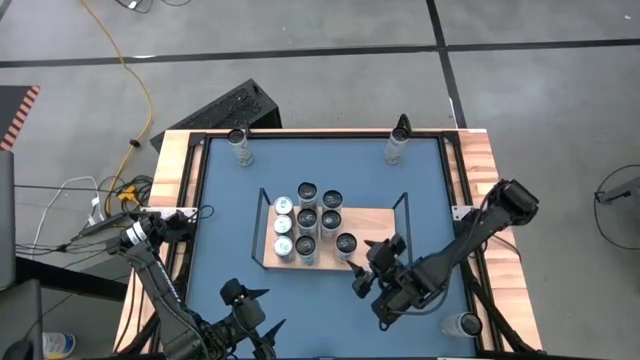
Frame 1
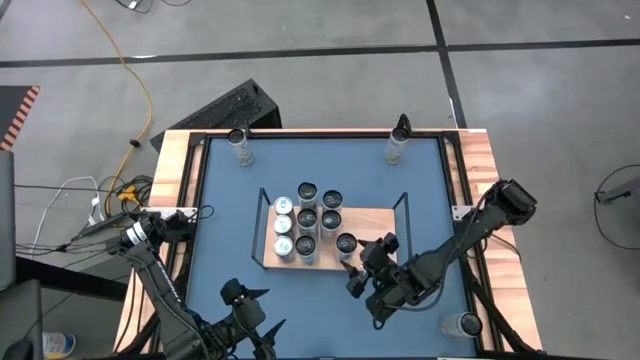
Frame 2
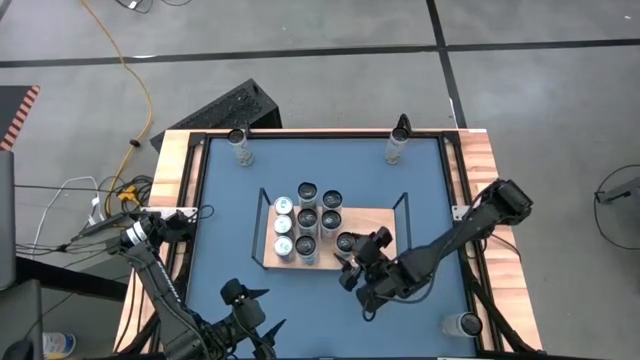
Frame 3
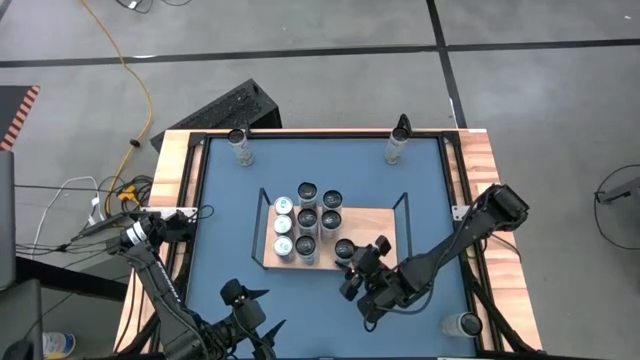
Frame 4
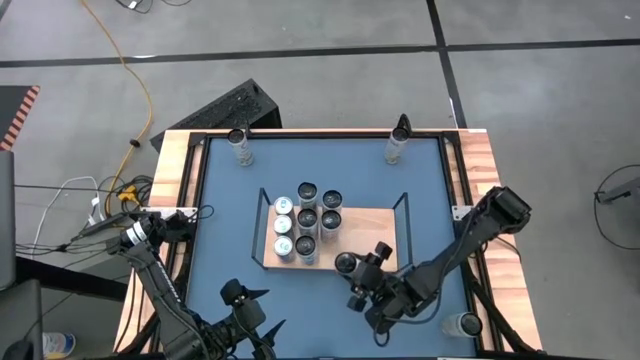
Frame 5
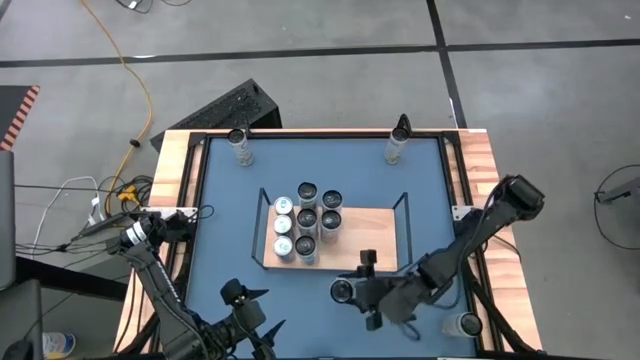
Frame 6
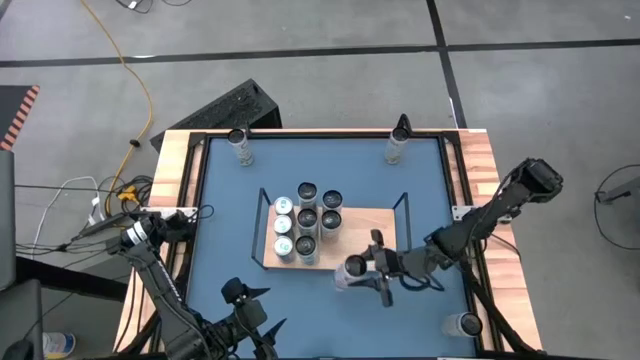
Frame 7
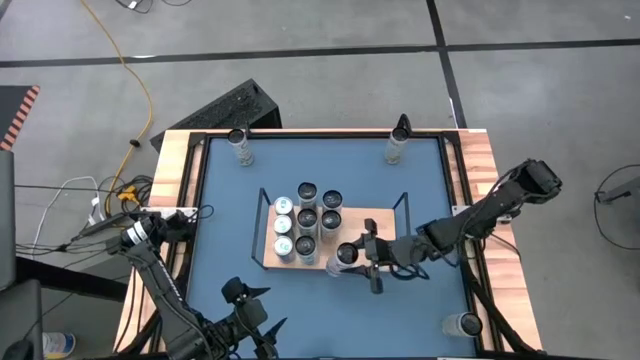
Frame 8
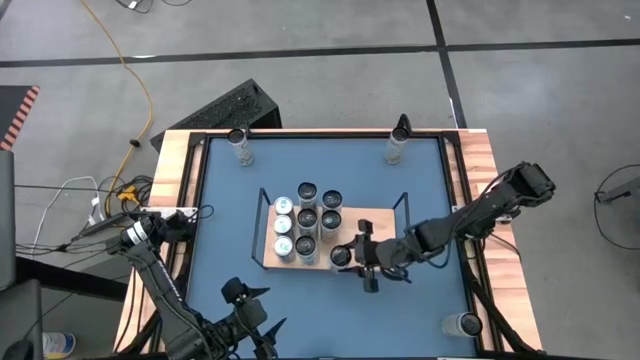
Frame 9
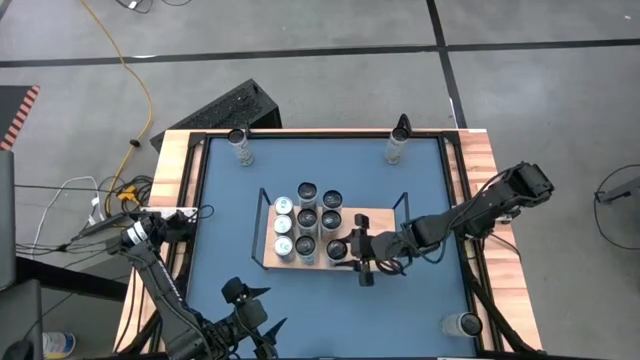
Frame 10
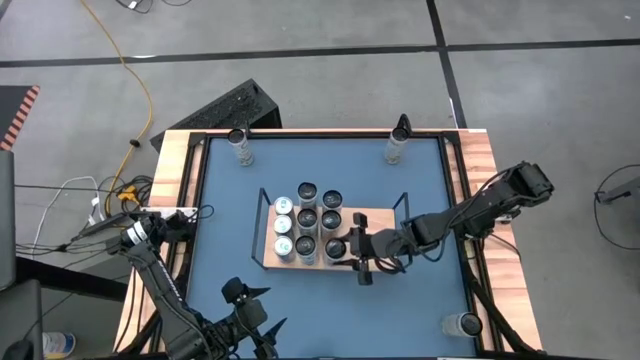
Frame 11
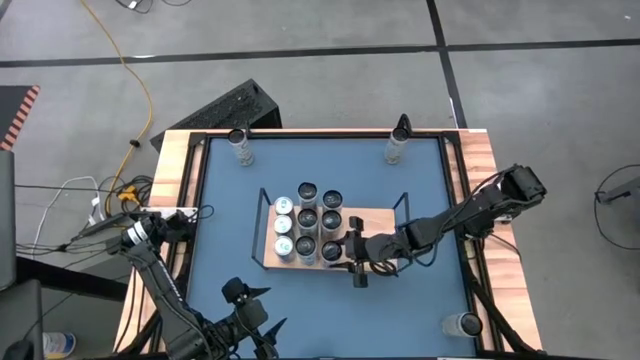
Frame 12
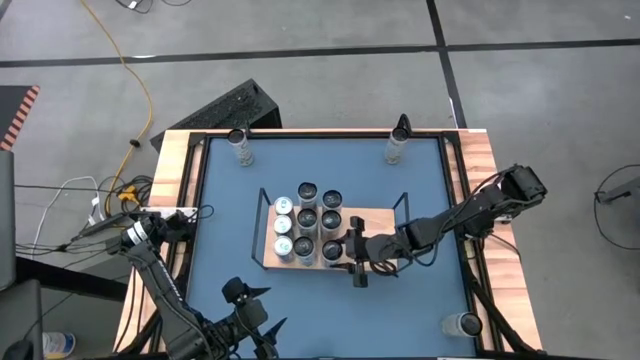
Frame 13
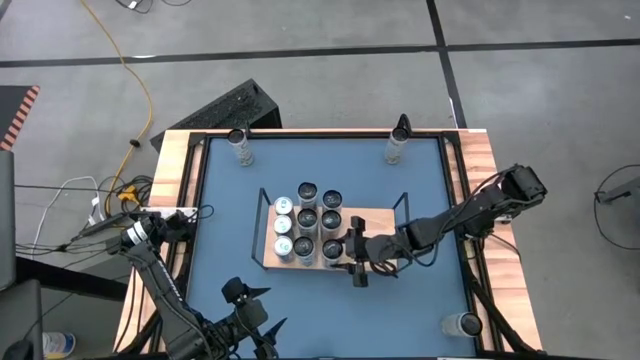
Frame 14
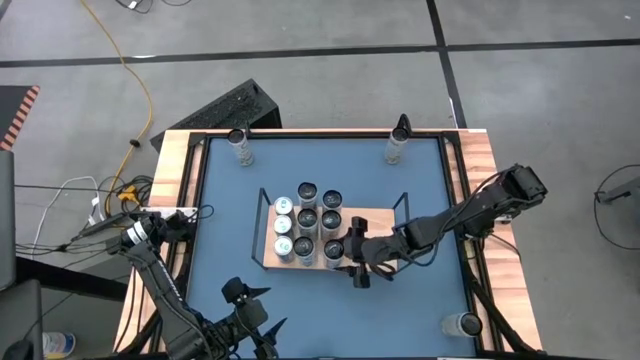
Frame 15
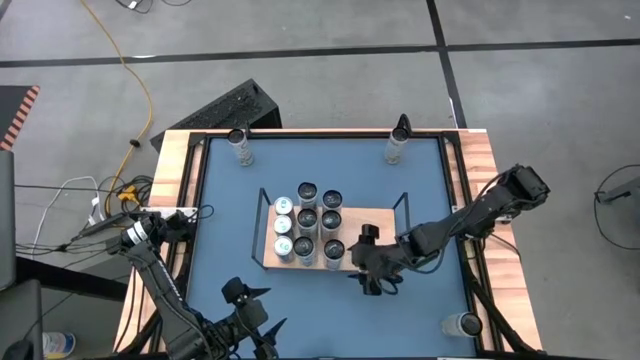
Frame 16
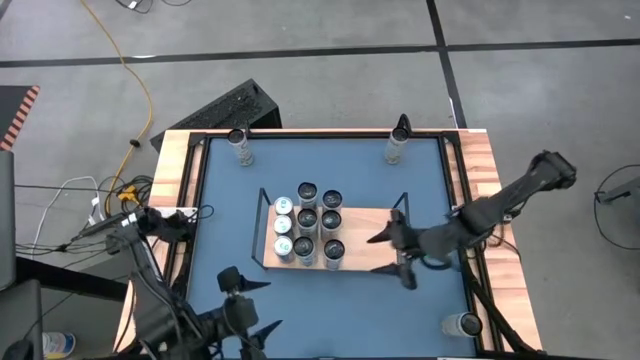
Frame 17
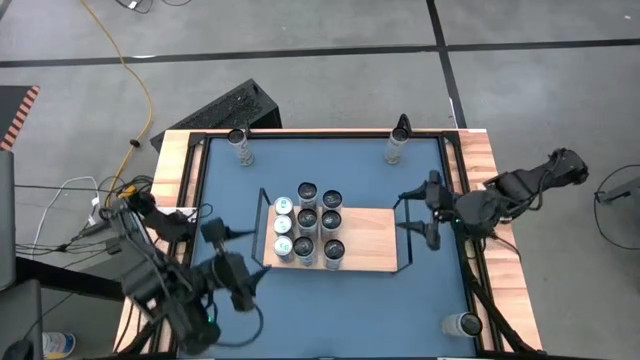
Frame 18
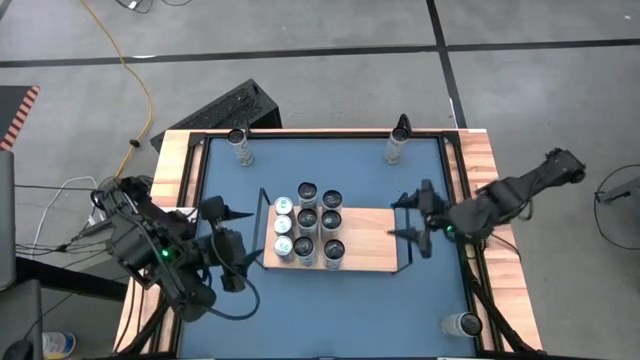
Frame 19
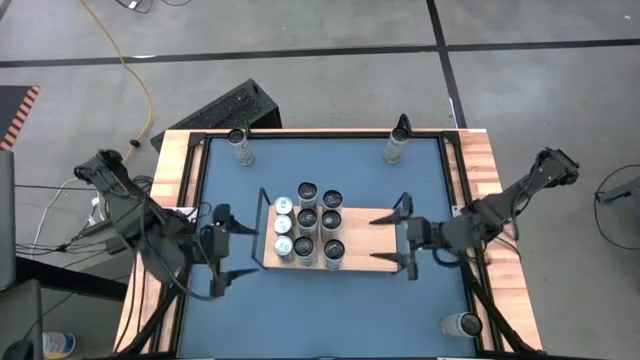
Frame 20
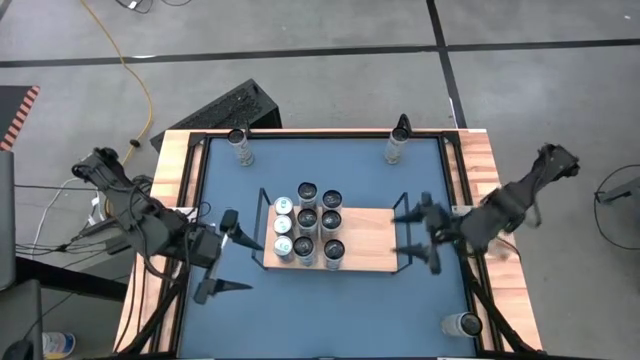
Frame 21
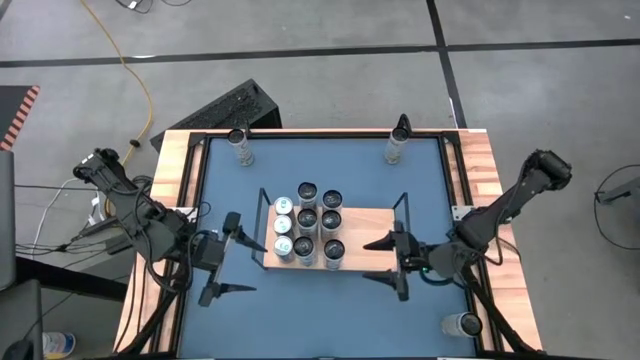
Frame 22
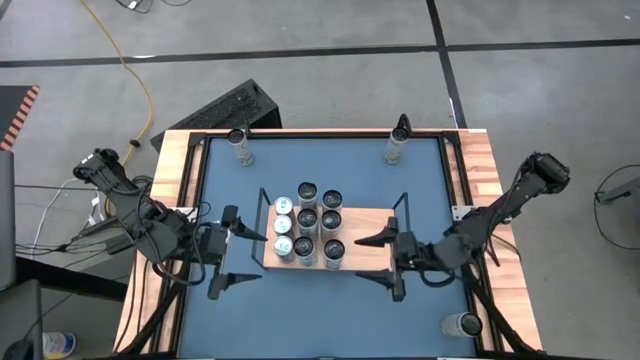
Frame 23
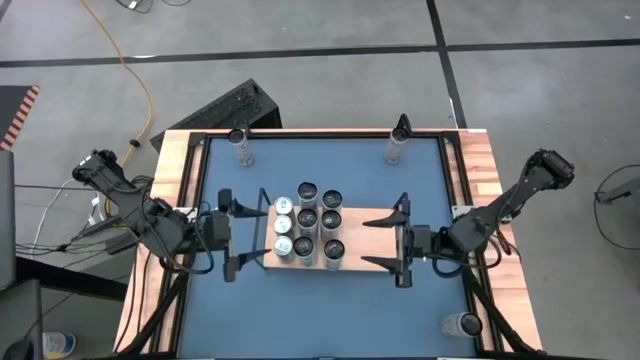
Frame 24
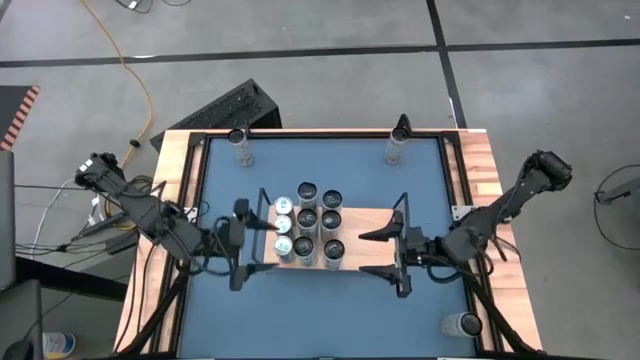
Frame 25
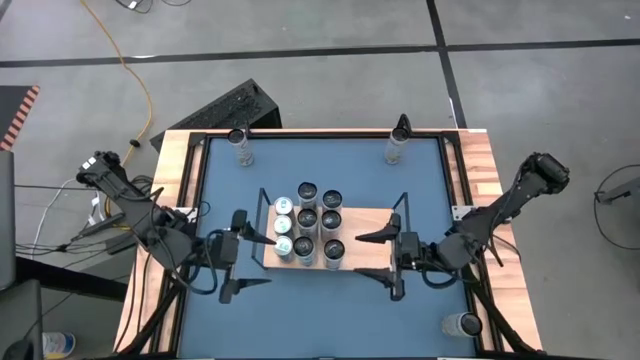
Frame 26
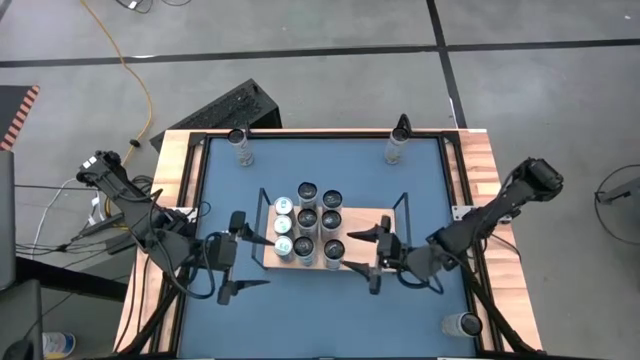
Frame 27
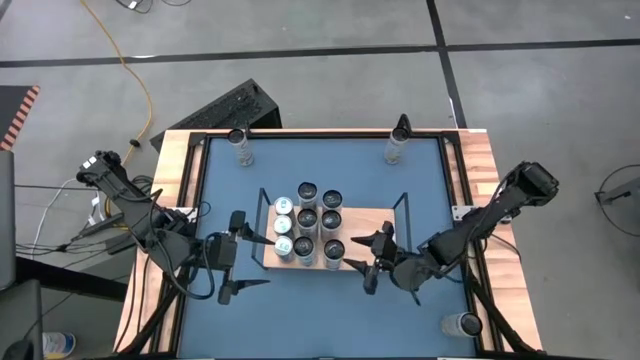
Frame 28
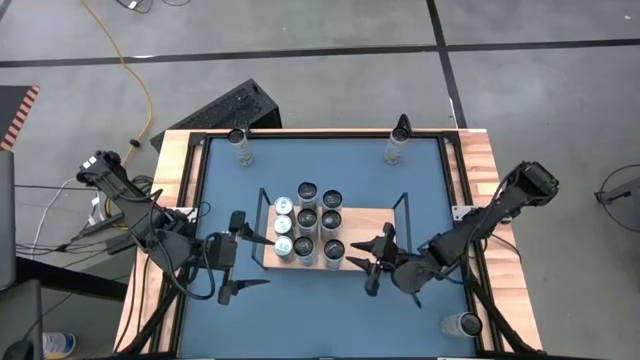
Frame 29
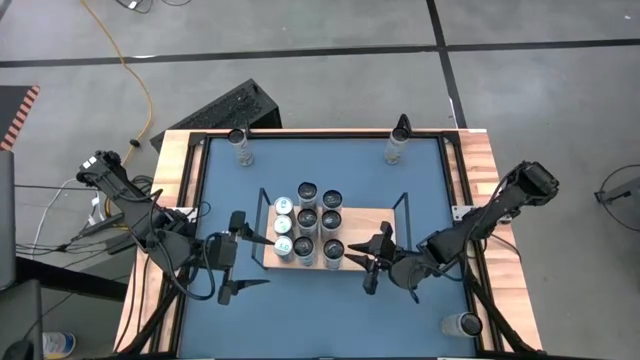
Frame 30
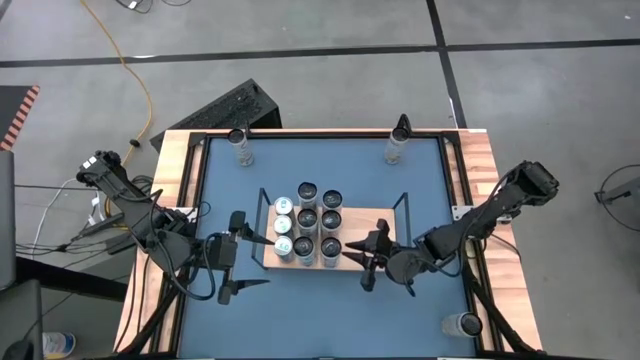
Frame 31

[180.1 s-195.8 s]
Task: Place canned beverage on shelf
Put the pink soda can on the shelf aligned with the other pink soda cans

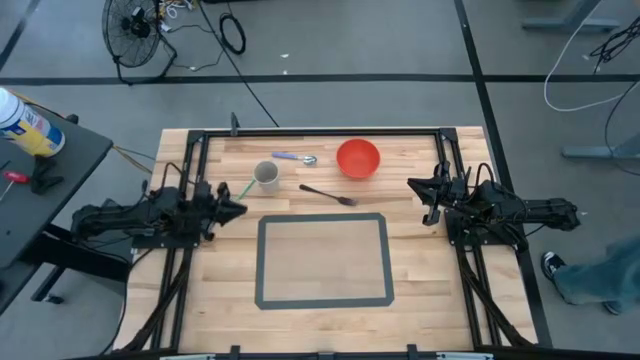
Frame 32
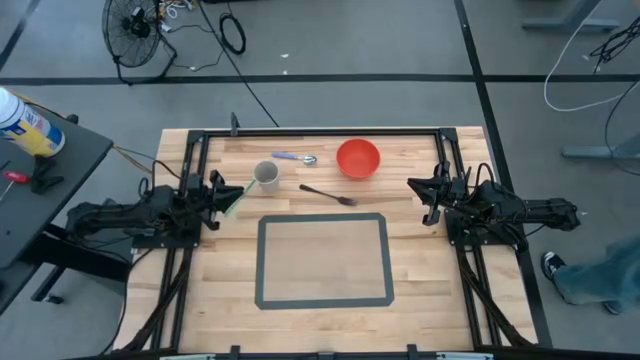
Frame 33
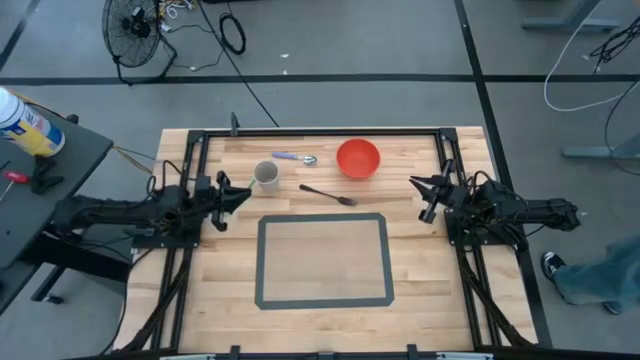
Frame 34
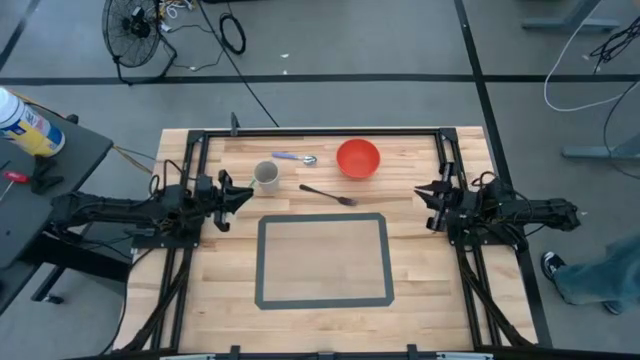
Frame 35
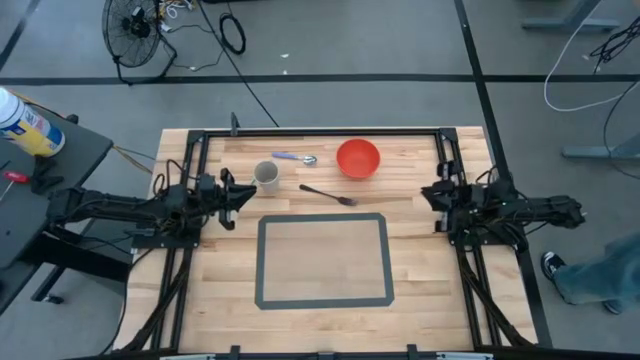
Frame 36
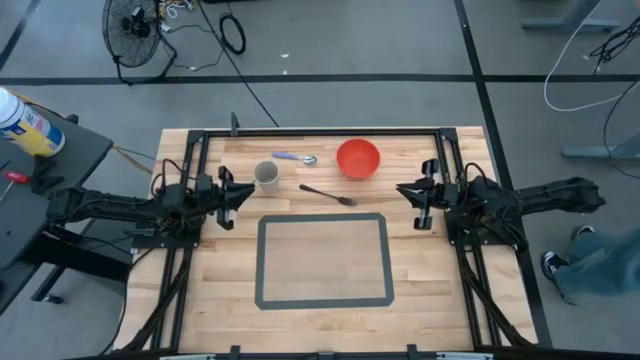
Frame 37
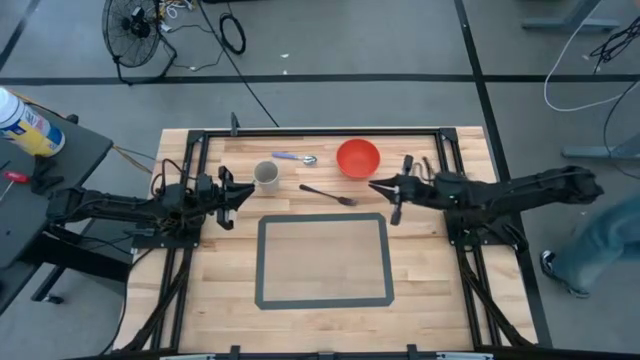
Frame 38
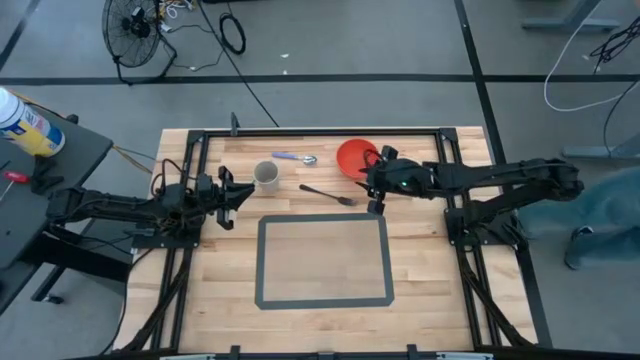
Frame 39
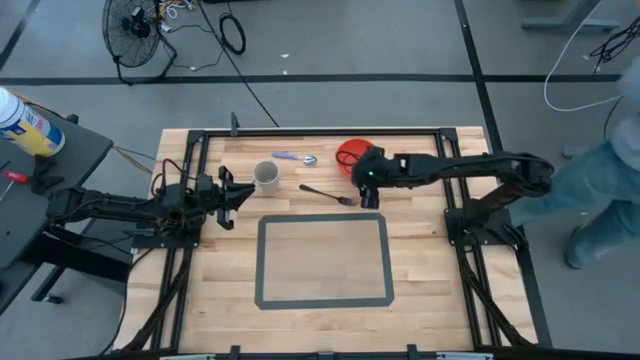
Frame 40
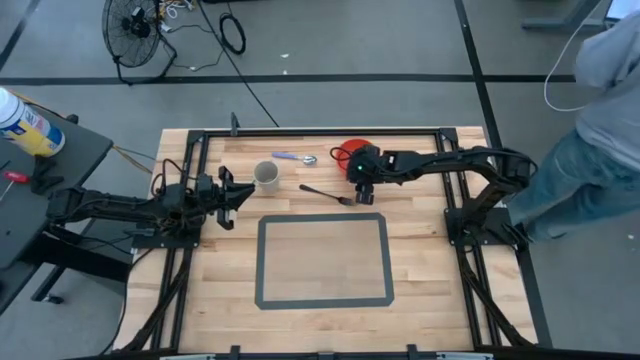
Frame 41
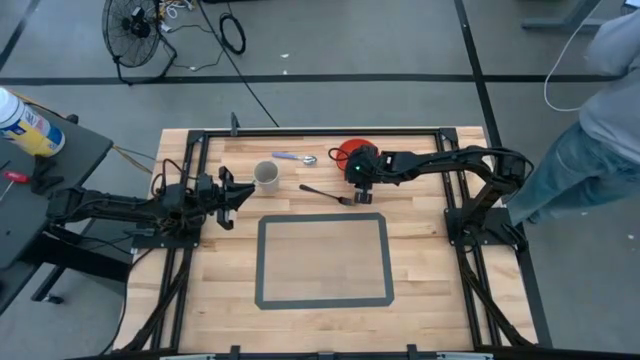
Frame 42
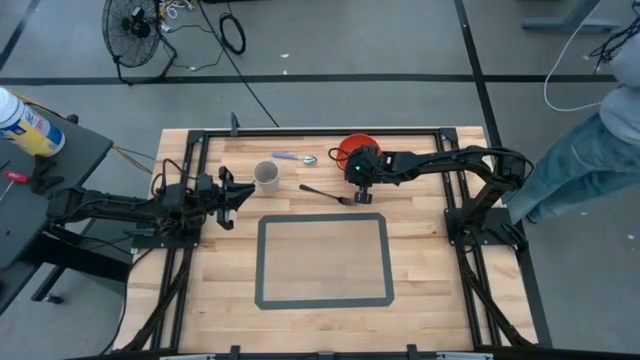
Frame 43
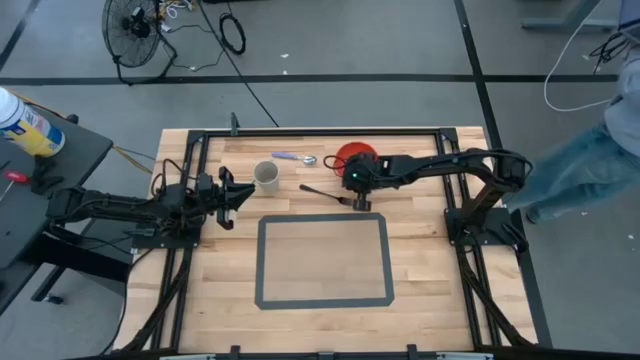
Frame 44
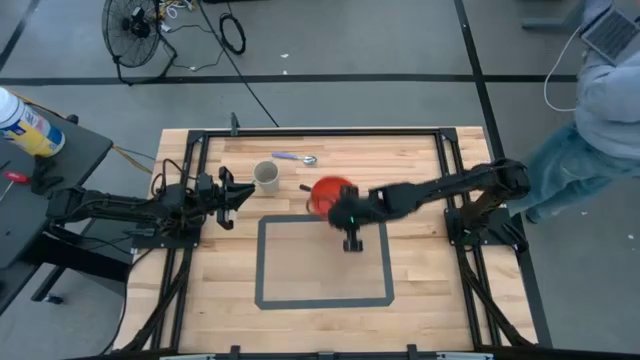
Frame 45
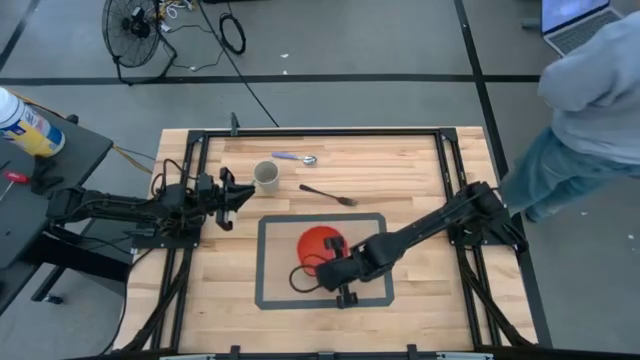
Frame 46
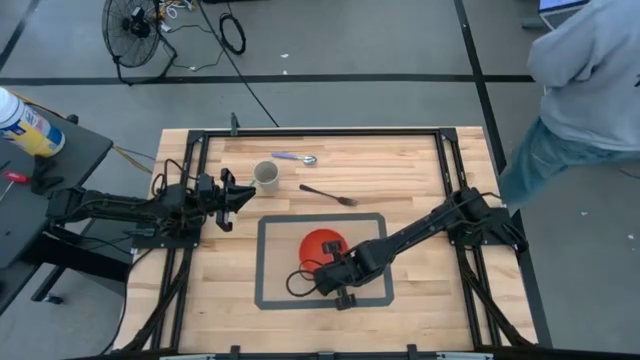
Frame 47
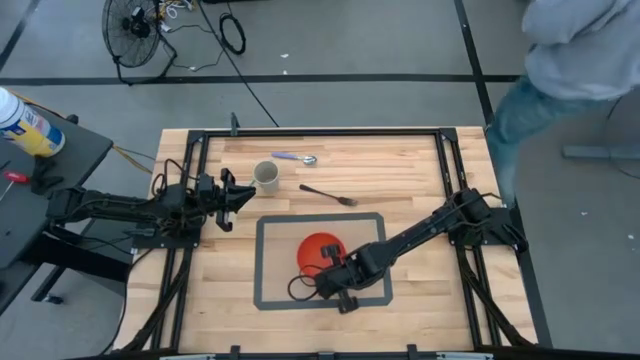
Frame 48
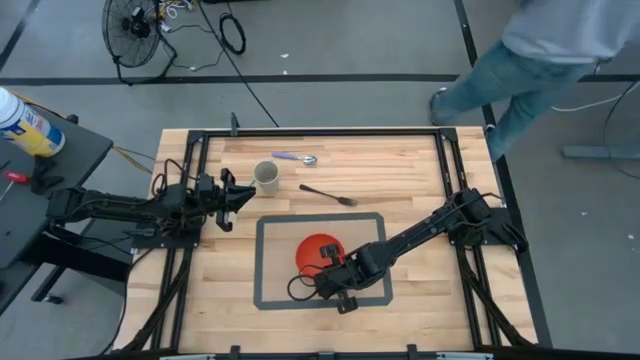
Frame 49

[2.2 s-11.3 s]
Task: Pick & Place Utensil
Put the orange bowl on the brown mat
